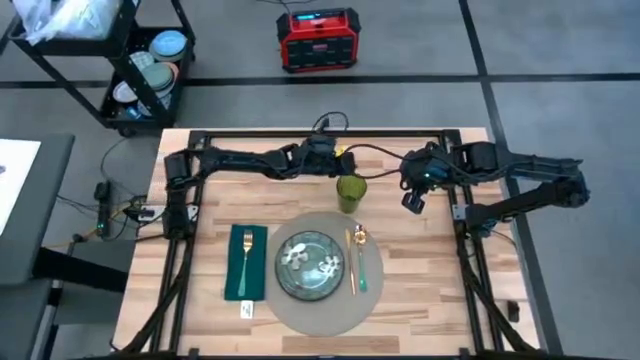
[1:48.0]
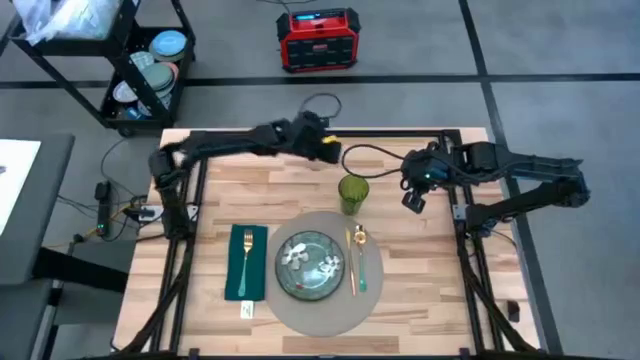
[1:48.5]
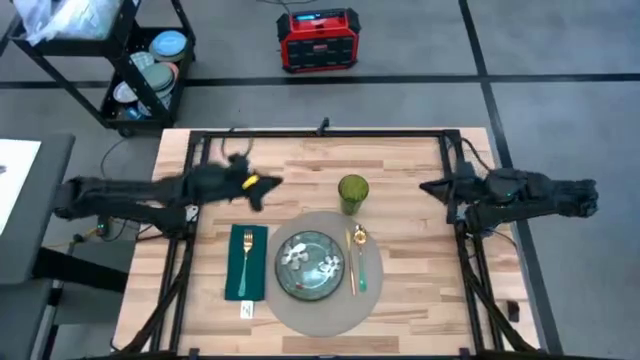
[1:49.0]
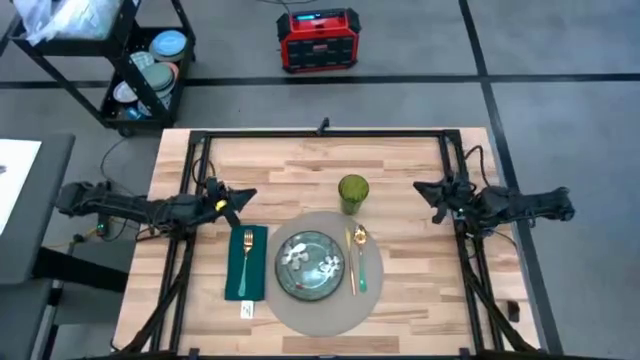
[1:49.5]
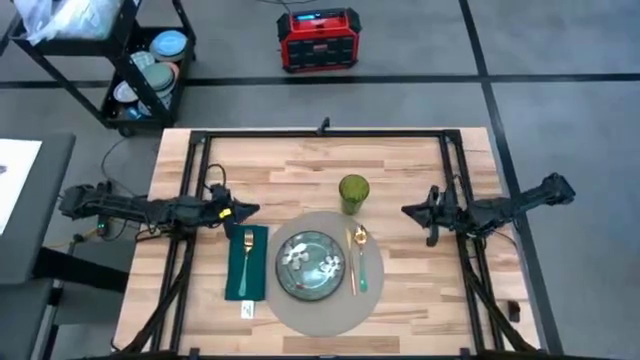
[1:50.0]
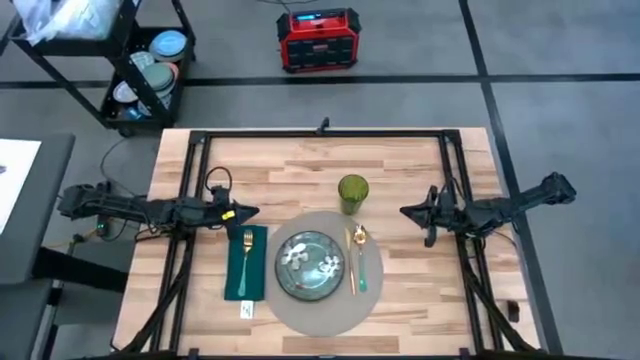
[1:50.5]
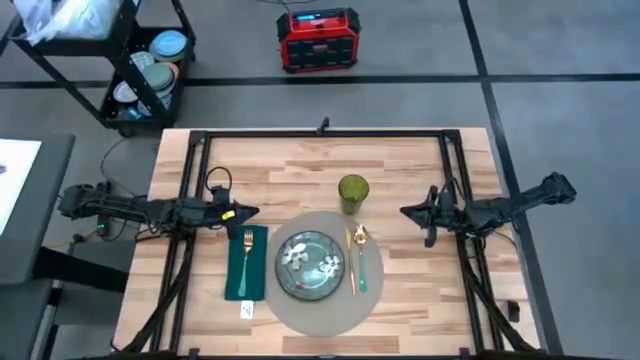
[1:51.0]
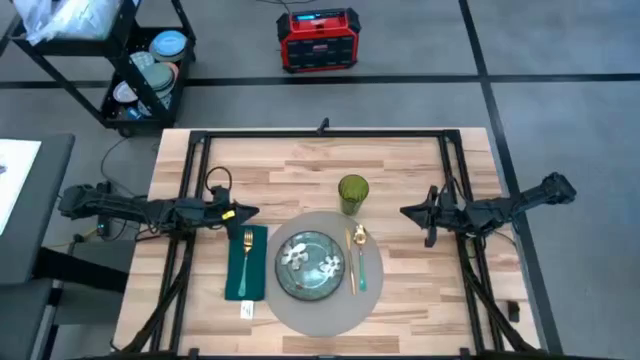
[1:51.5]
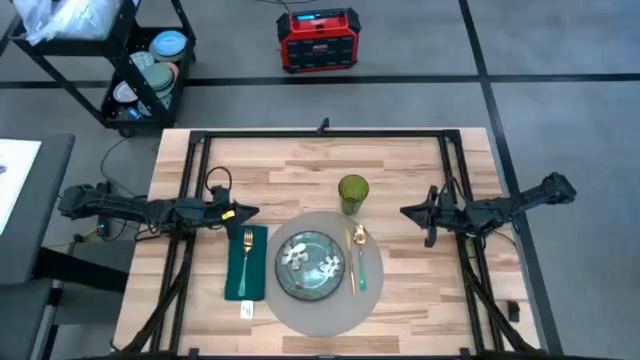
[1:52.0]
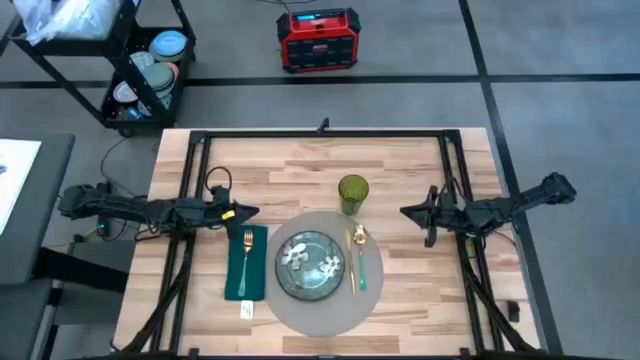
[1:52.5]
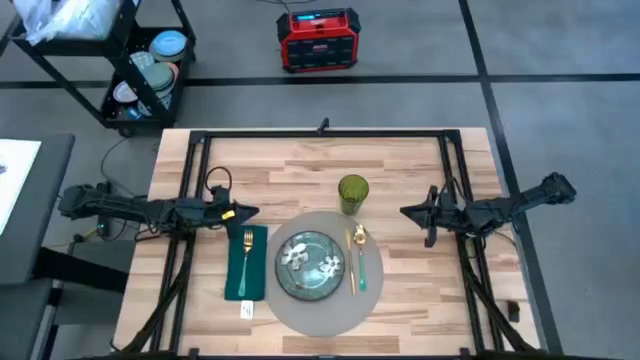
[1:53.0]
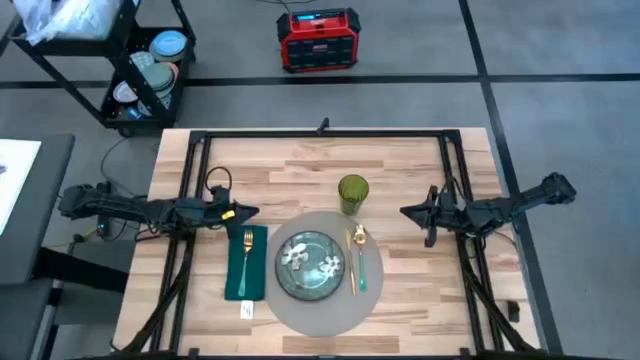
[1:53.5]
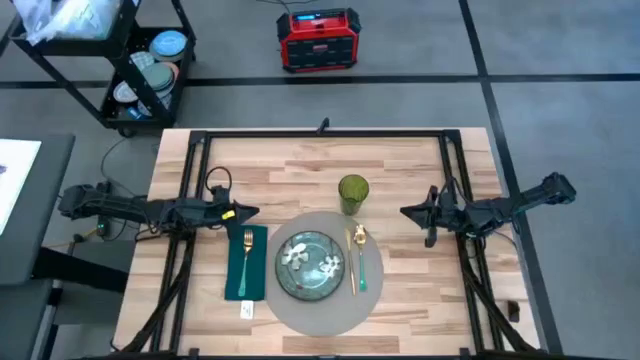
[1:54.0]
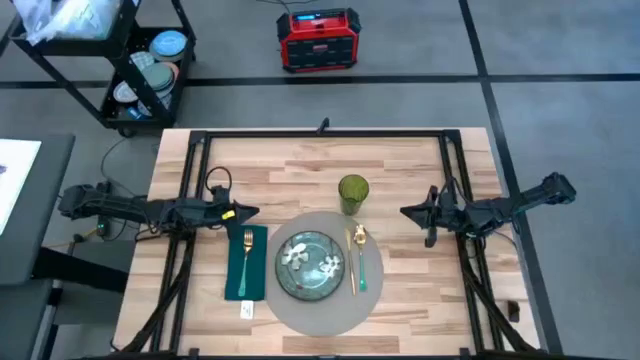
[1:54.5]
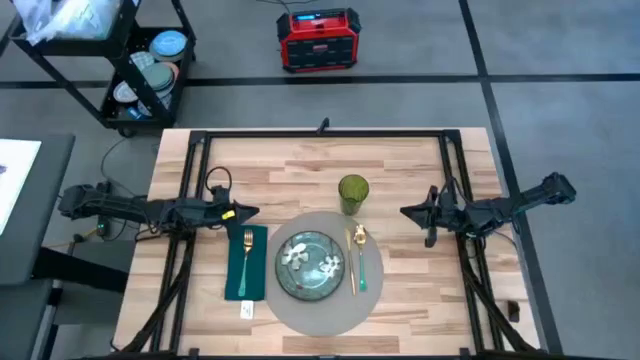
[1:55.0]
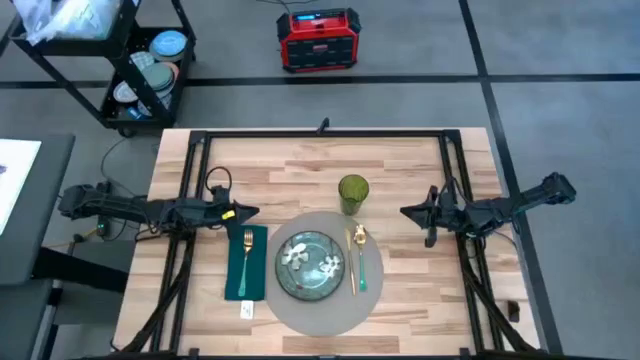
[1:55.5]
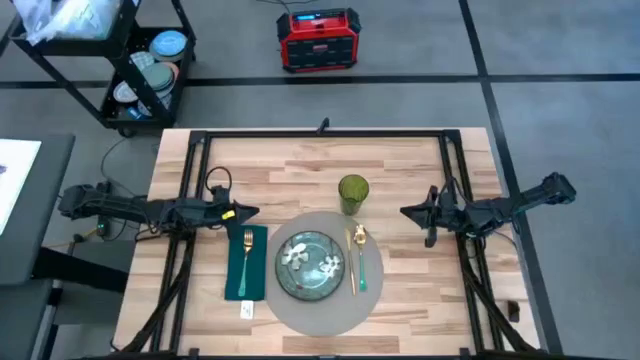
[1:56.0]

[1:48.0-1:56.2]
Task: Set table place
Return to Home Position

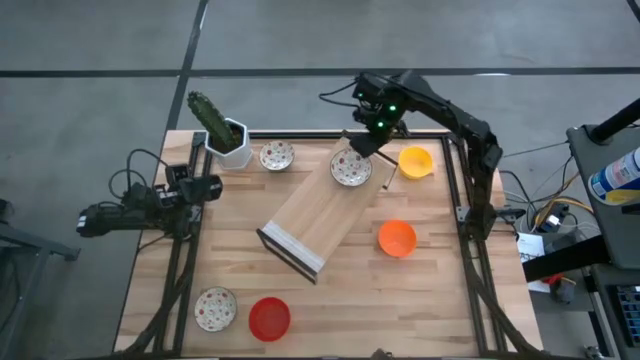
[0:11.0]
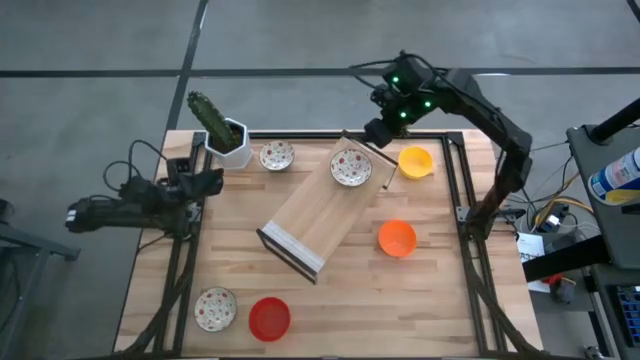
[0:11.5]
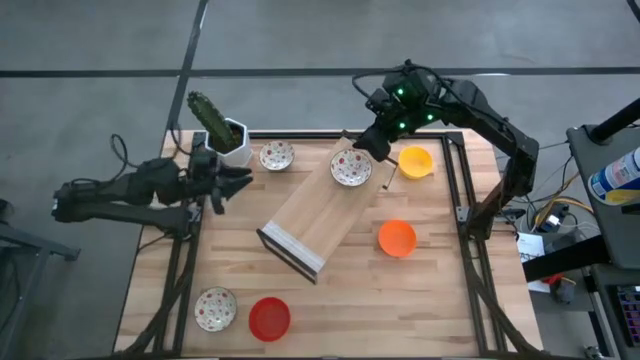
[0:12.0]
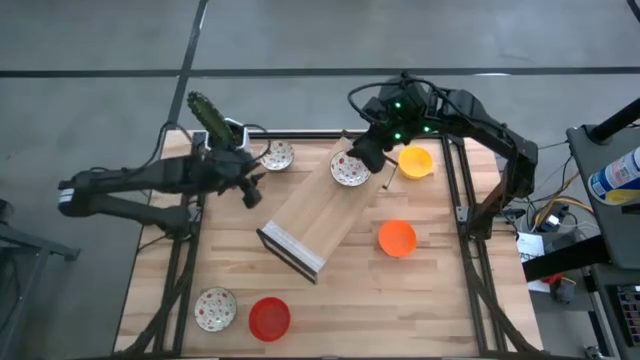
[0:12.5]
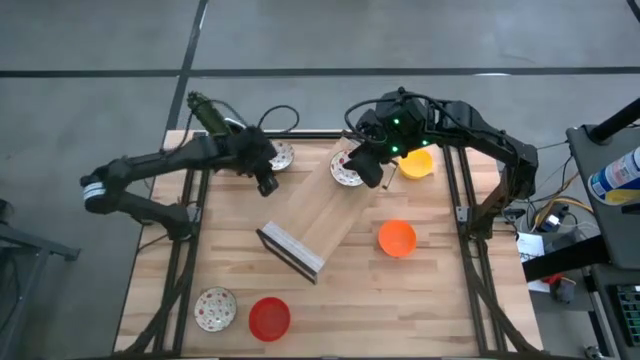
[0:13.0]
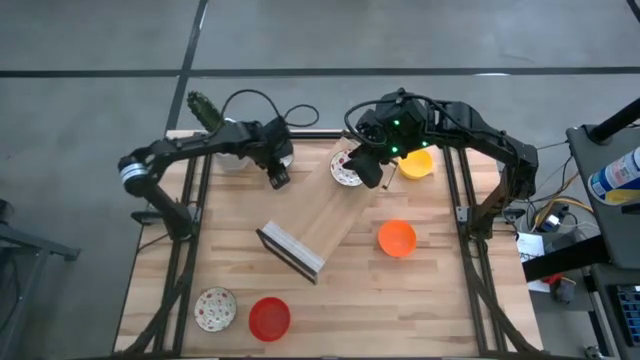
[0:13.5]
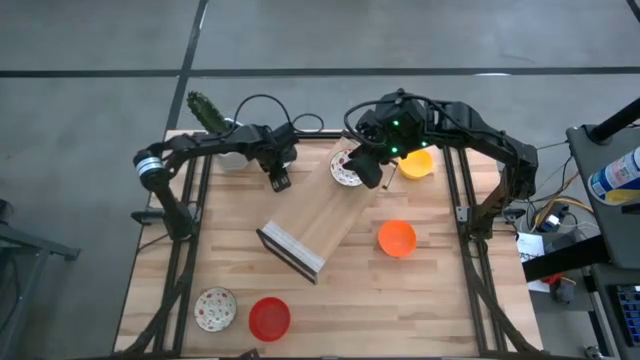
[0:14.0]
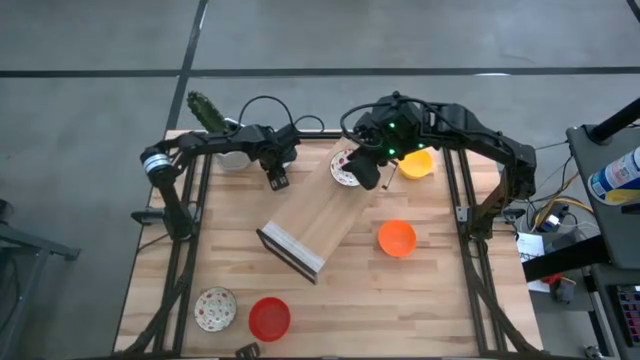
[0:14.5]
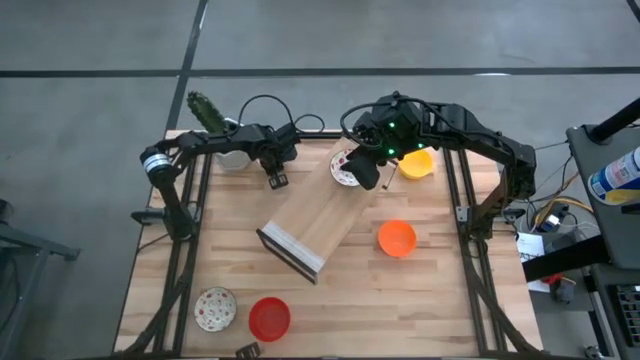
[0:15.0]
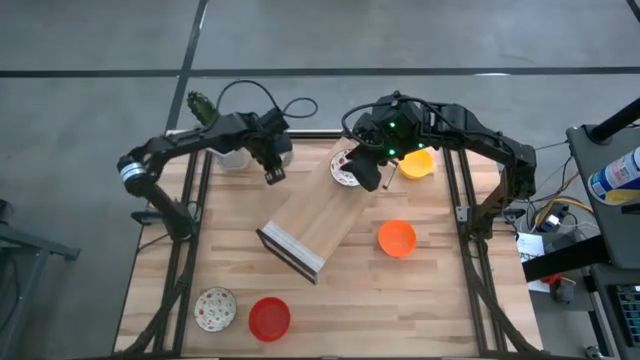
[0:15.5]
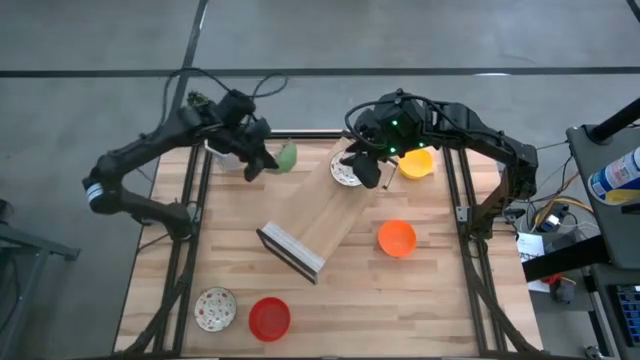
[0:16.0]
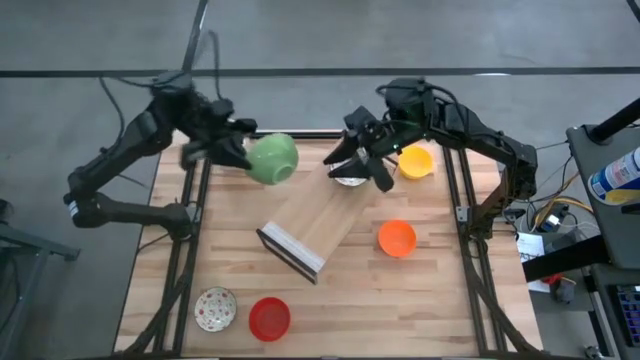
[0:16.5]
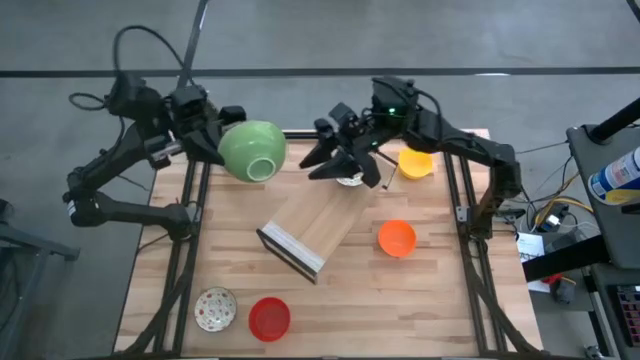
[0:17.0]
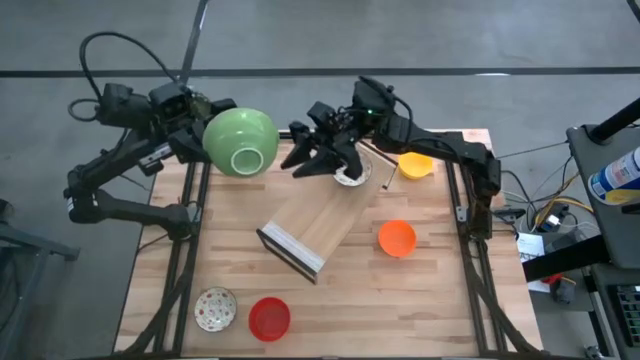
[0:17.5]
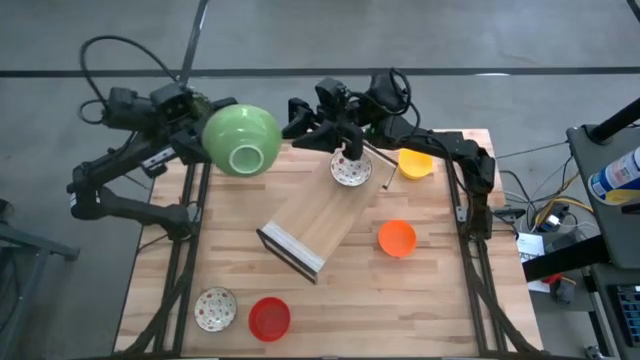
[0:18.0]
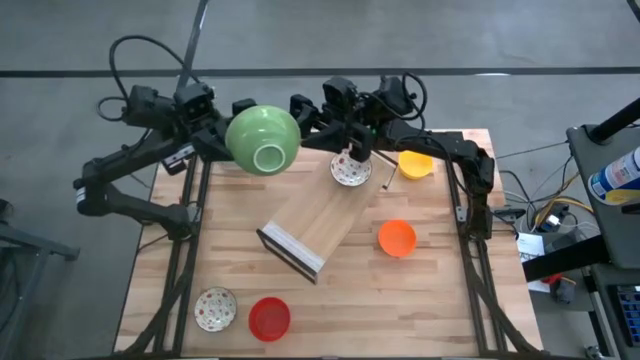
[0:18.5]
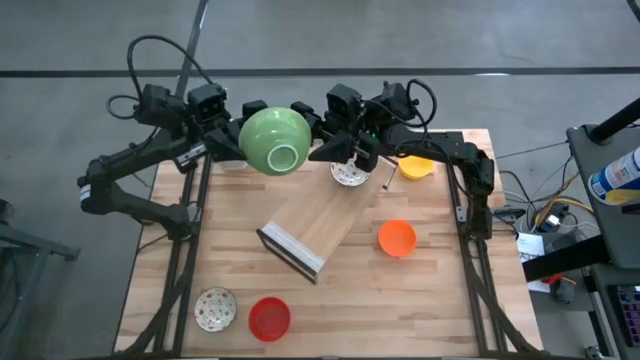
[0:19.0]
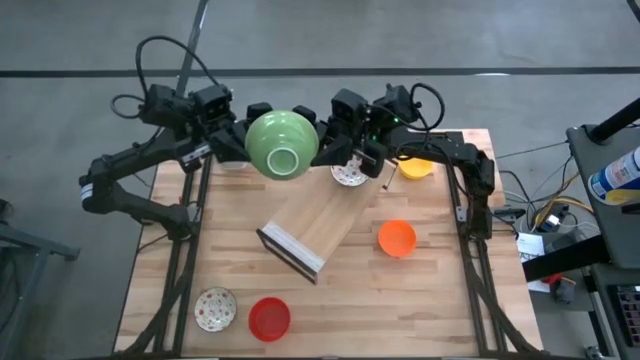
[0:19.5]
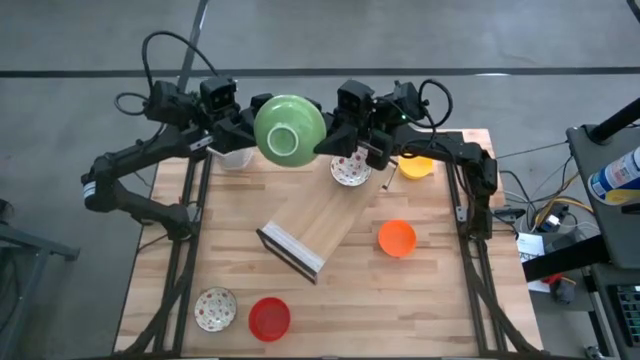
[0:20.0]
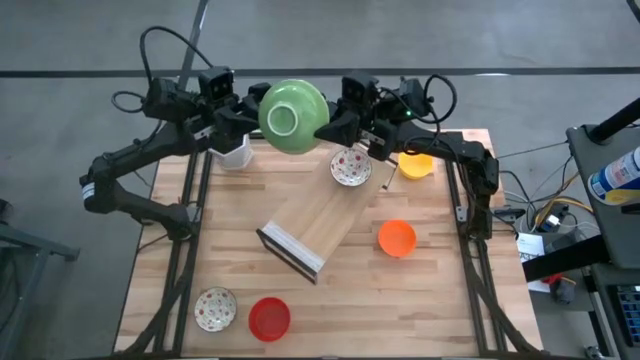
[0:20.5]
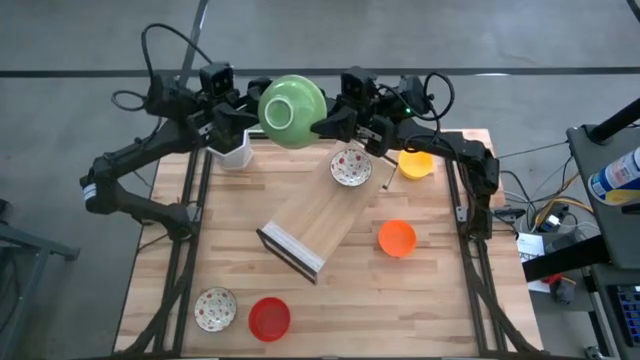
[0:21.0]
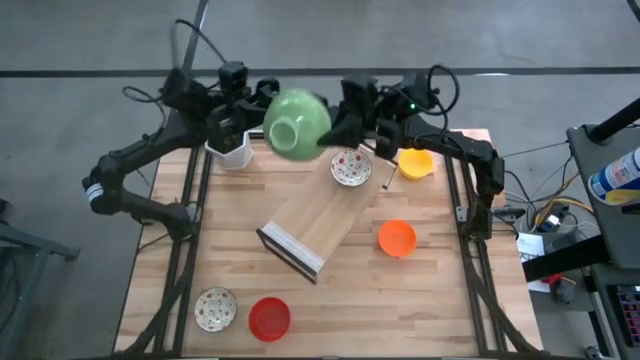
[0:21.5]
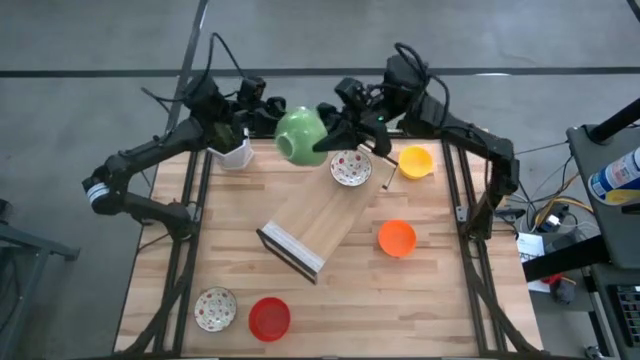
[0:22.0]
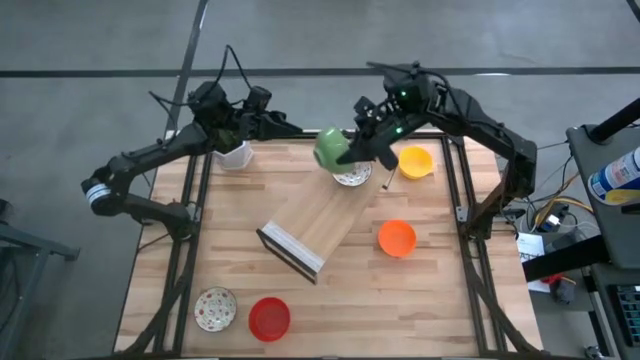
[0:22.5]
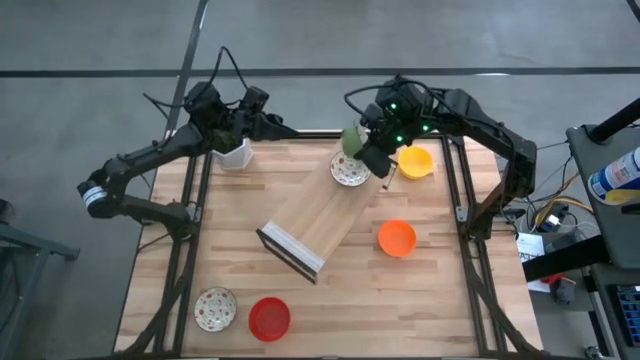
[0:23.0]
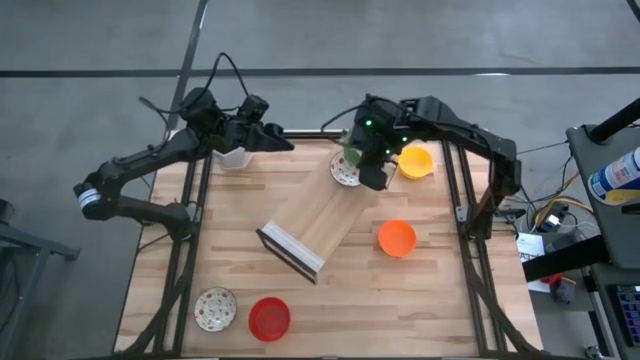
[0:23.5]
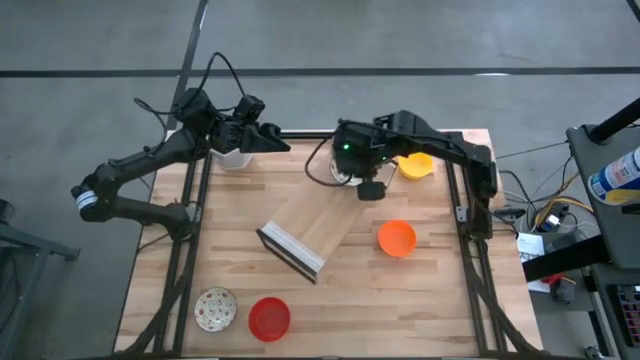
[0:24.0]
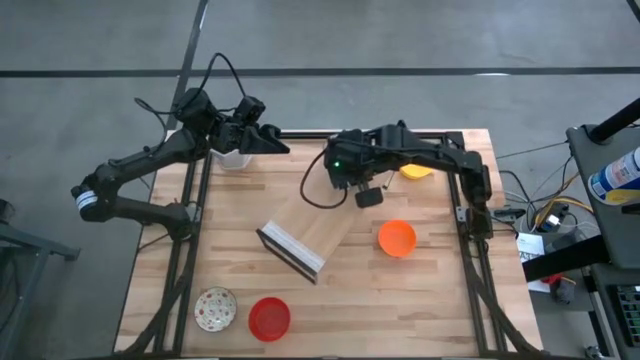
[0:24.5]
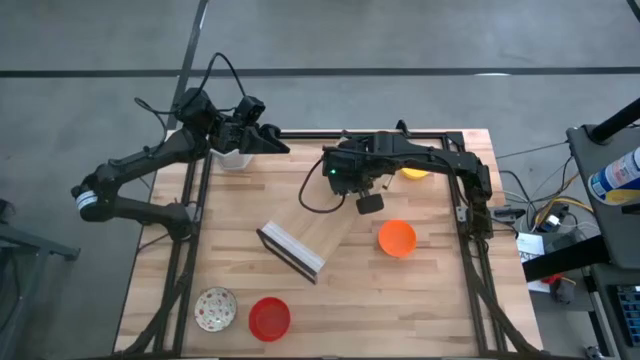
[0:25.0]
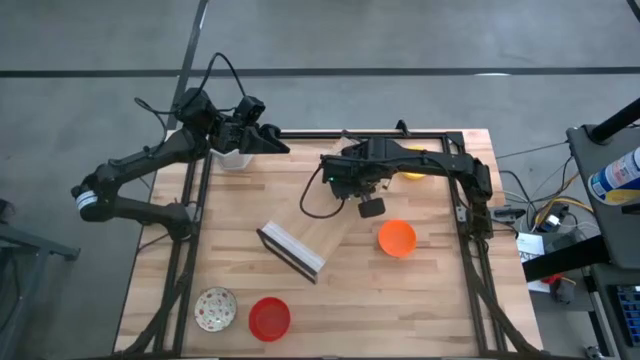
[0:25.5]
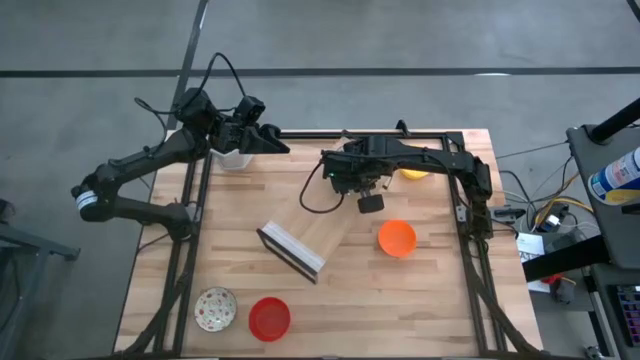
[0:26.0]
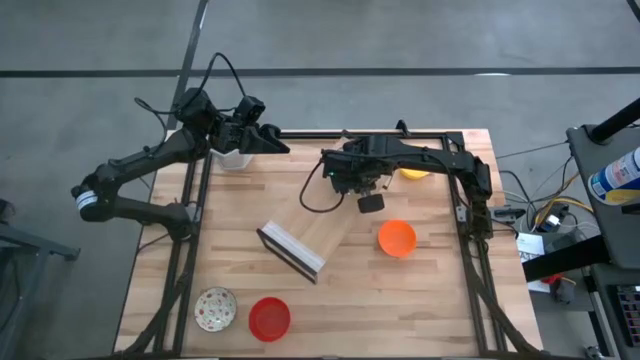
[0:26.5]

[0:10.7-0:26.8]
Task: Pick & Place Mini bowls
Stack the top white bowl on the top of the white bowl on the shelf
